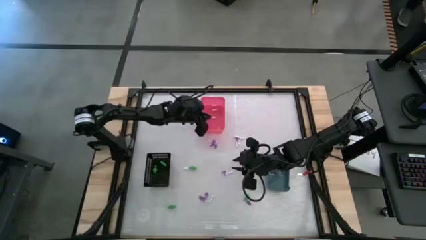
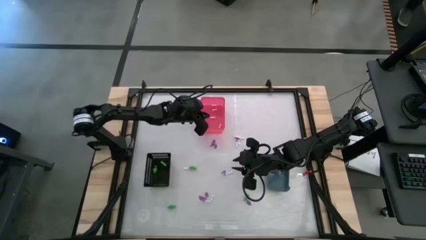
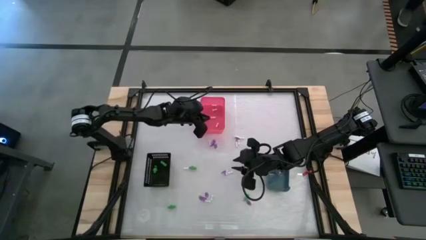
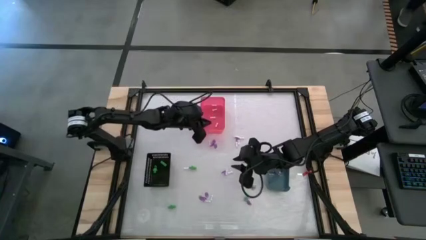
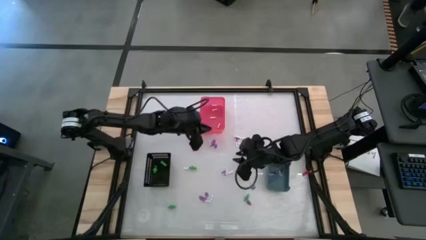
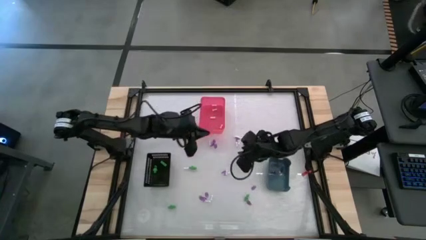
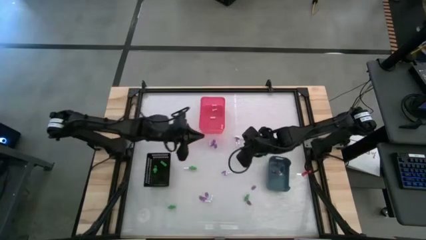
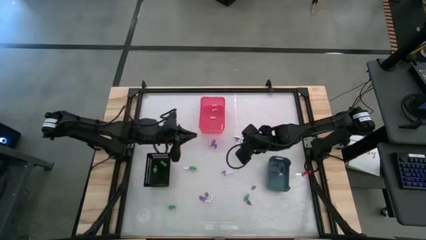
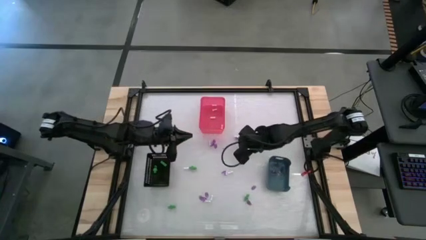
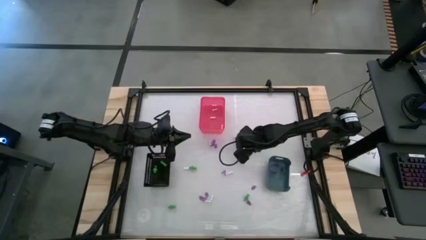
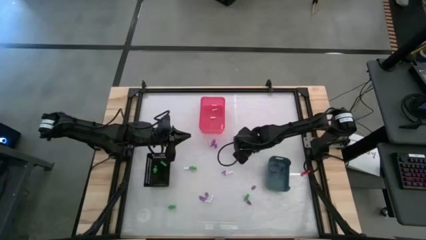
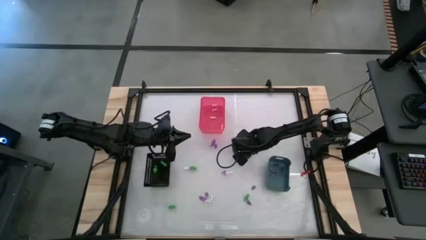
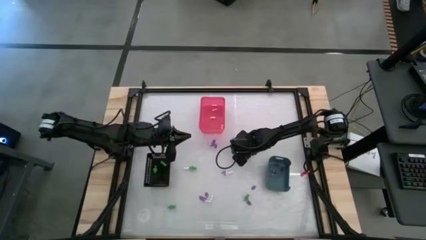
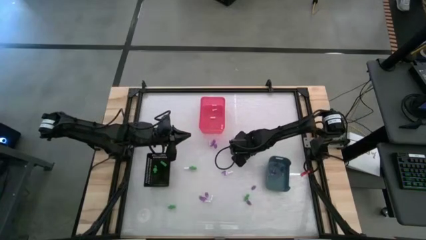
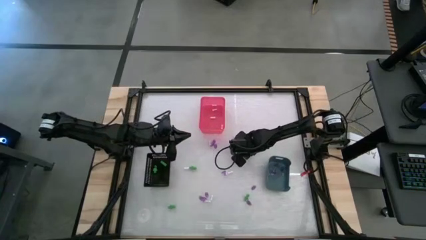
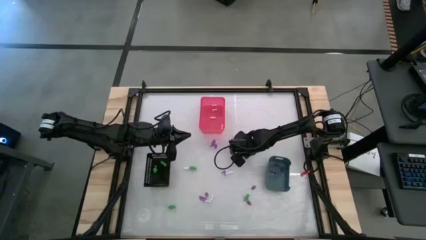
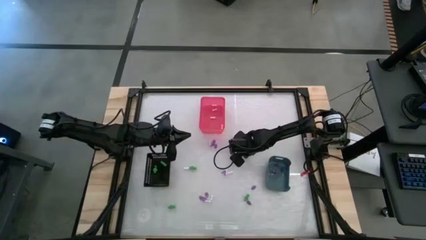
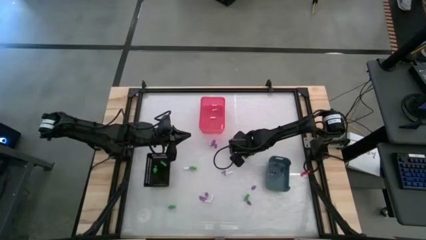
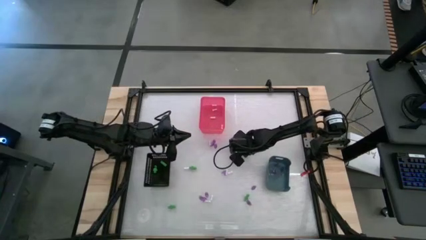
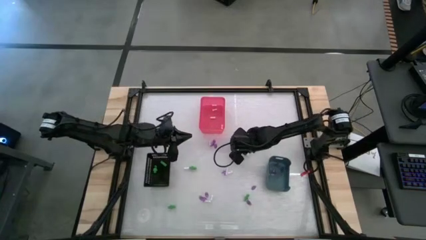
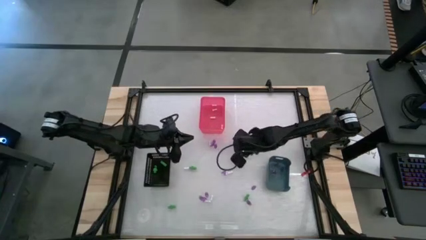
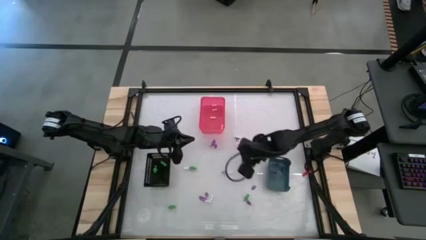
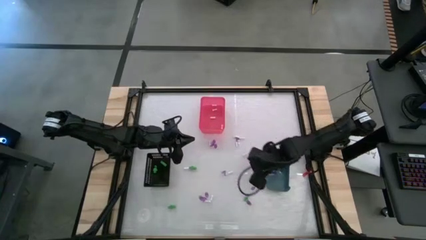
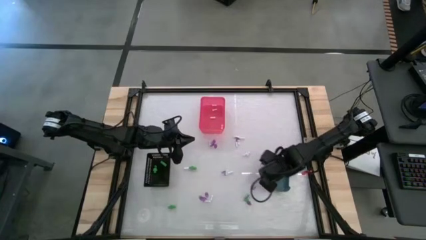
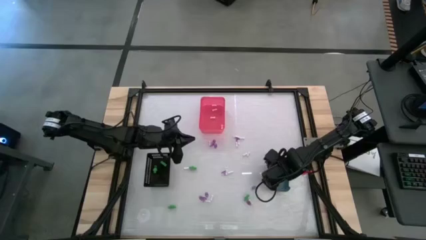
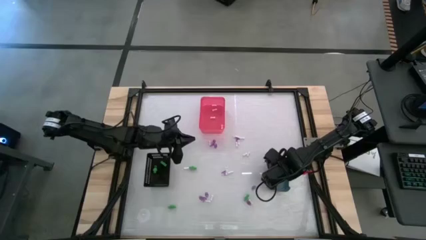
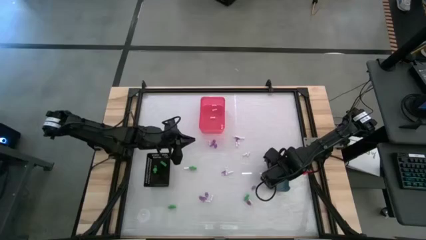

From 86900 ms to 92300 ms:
Task: Sort Halloween decoration
Put the witch hat toy into the blue bin

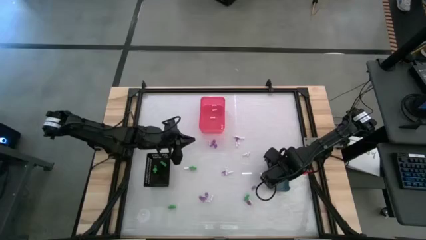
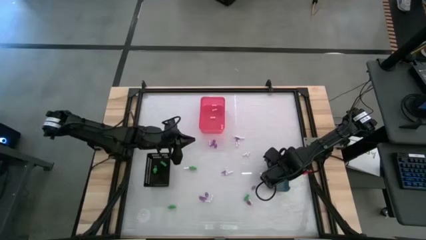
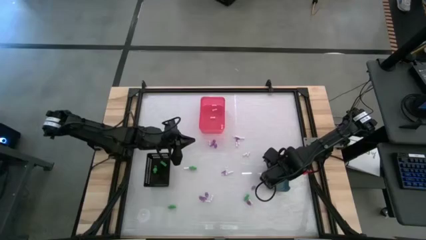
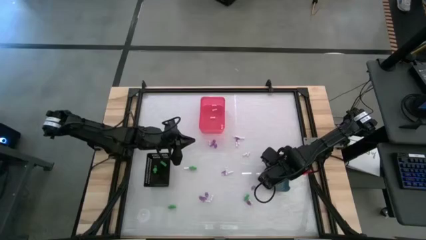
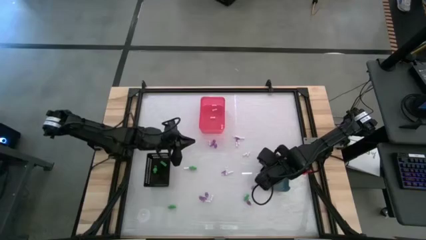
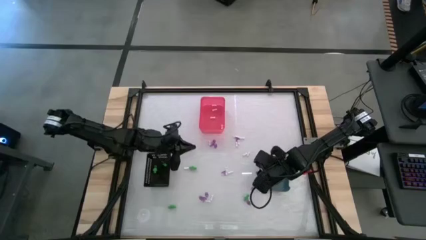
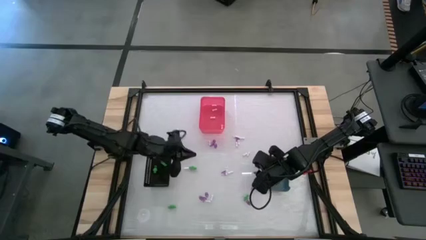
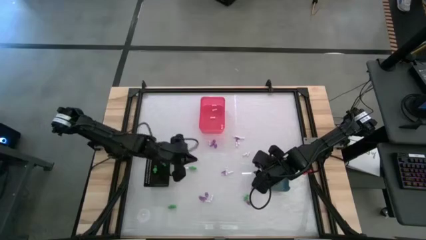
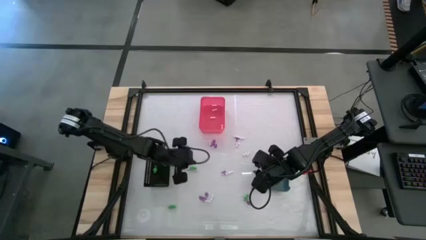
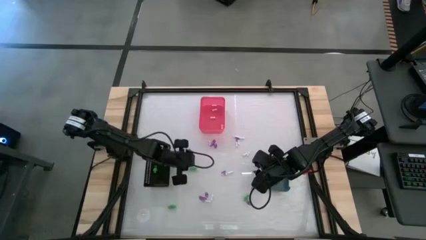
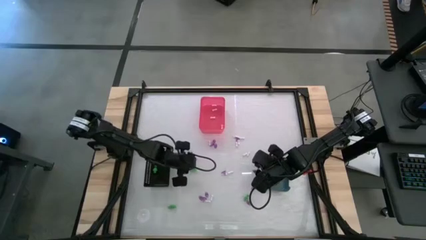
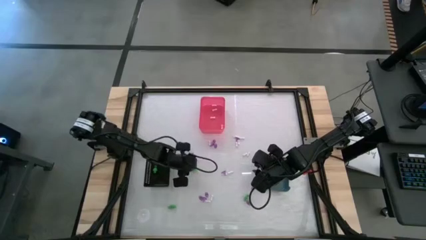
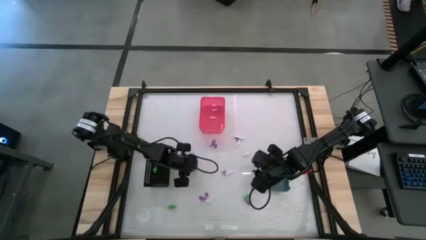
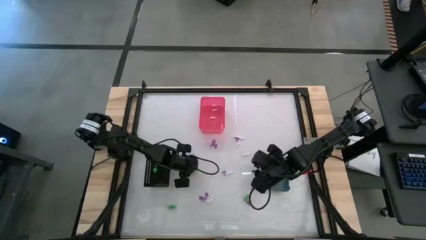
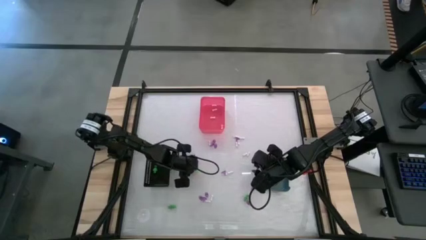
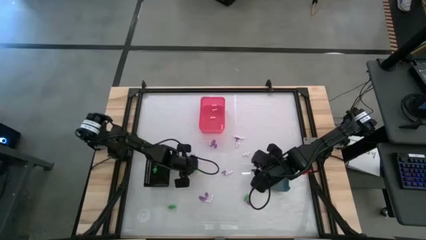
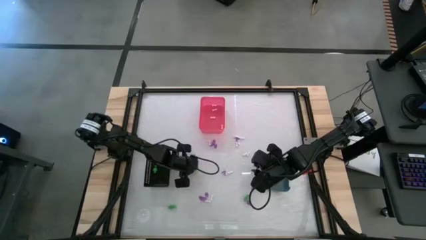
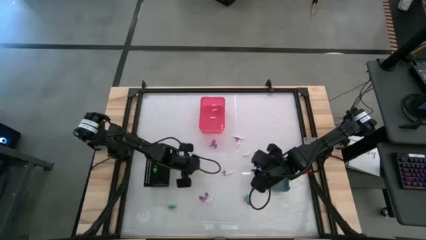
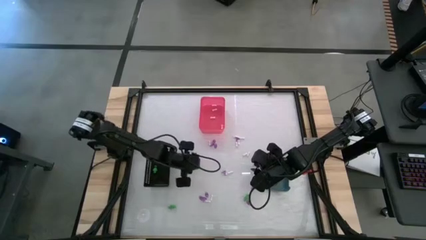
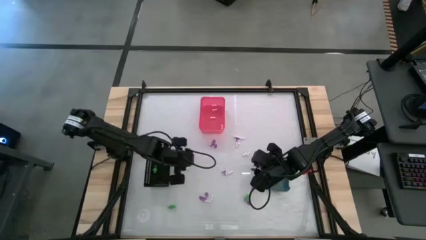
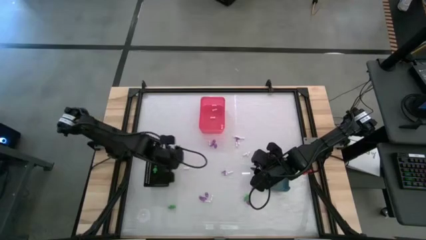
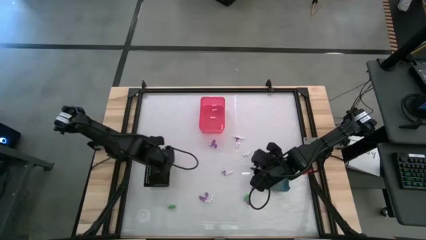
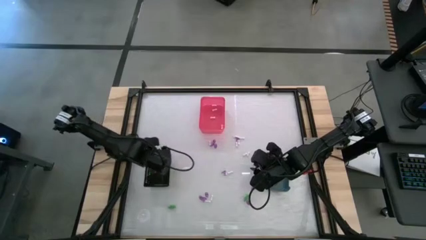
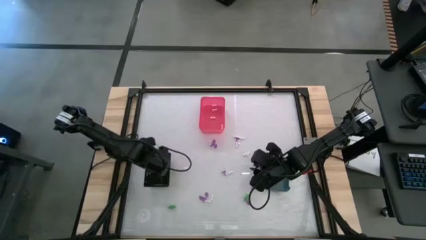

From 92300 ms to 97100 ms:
Put the skeleton toy into the black basket

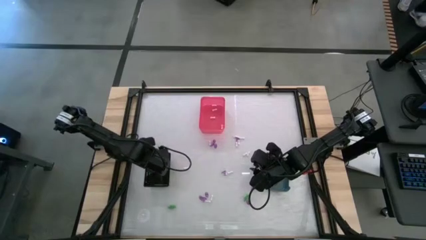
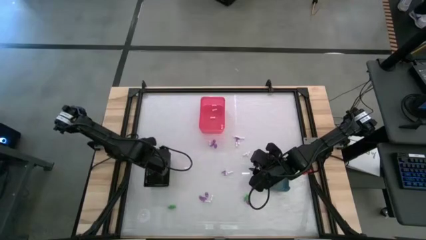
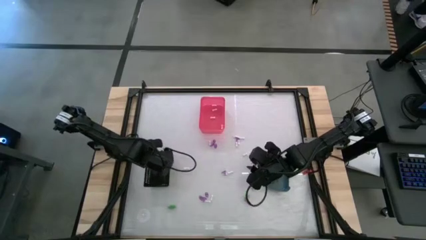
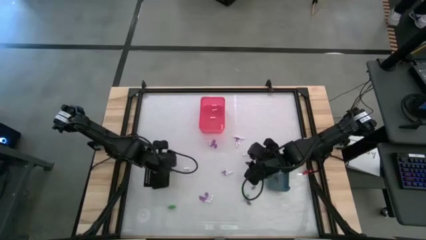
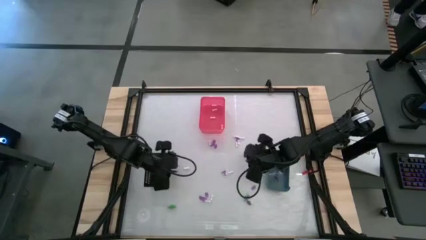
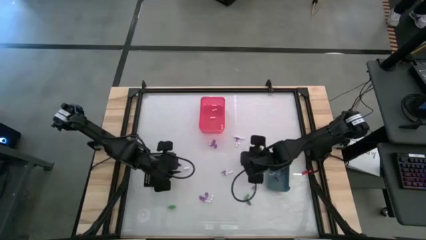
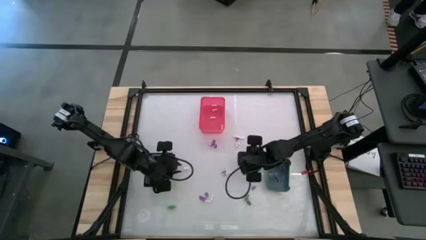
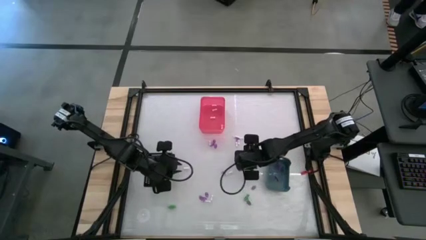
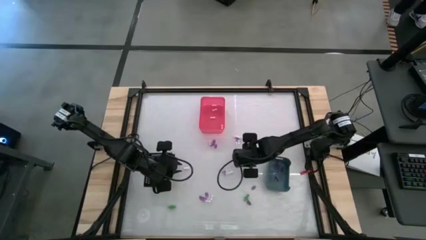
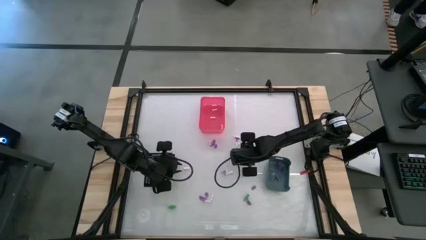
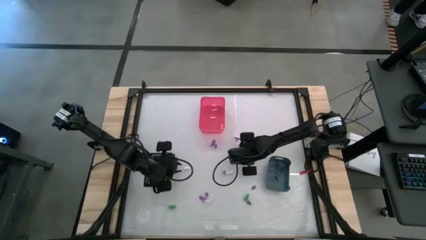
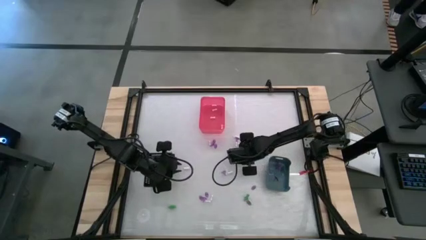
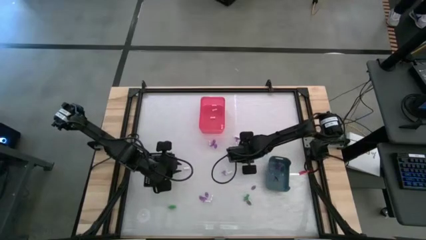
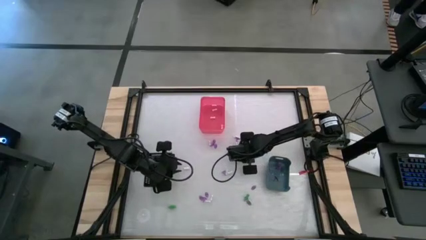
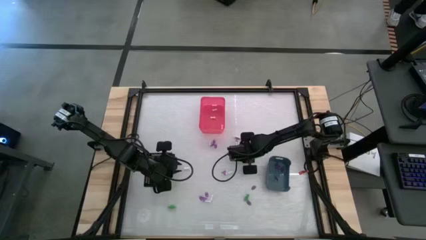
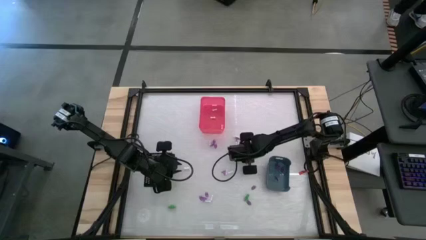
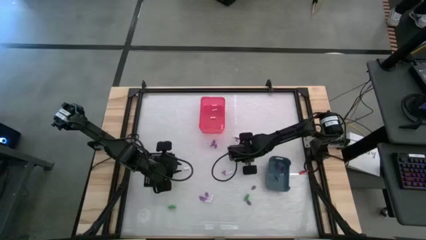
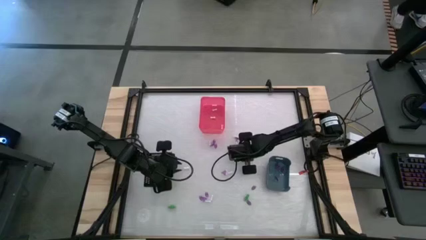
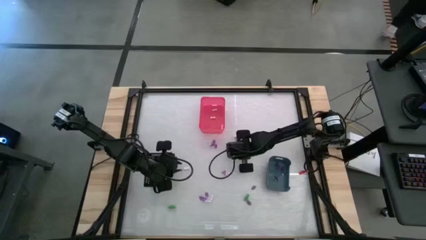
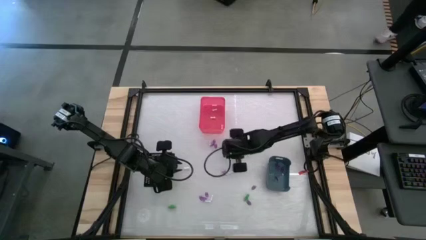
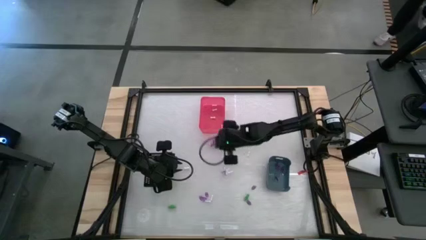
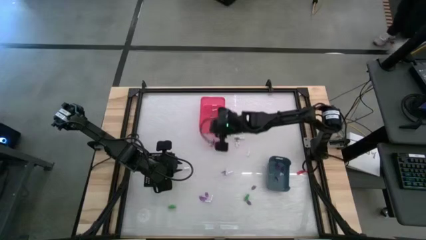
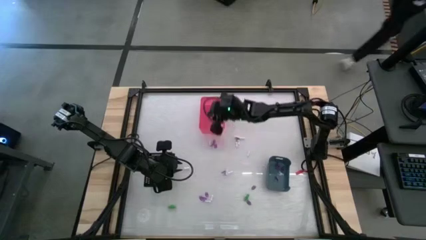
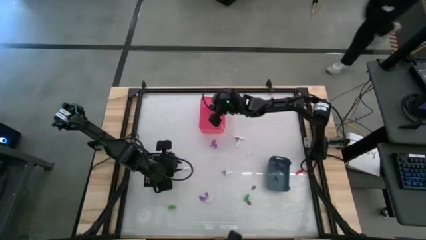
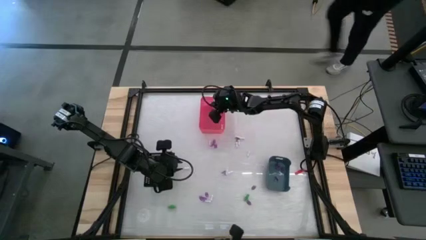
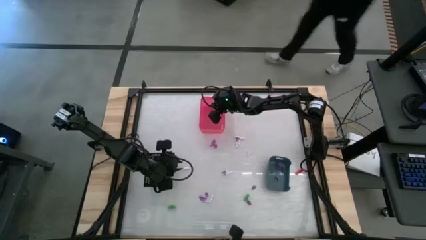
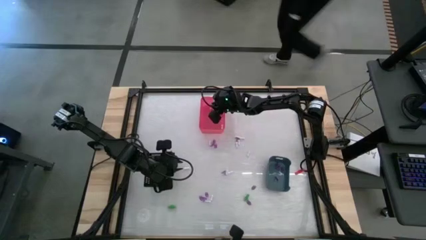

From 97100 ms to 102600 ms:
Put the bone toy into the red bin

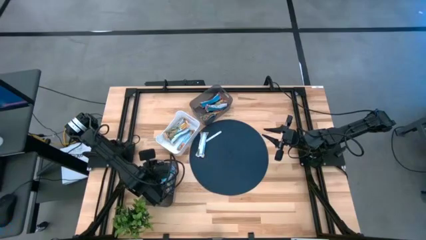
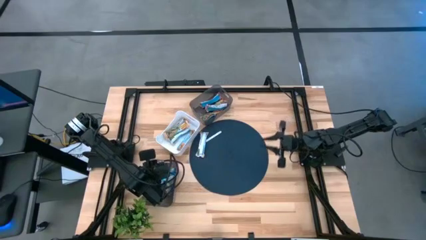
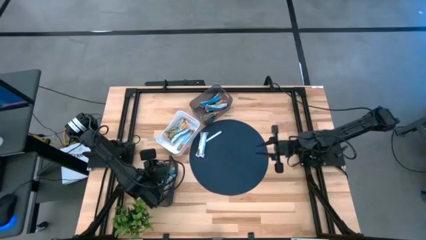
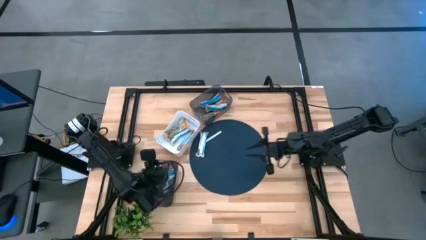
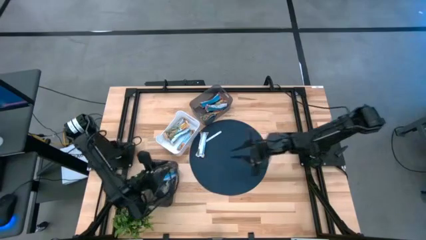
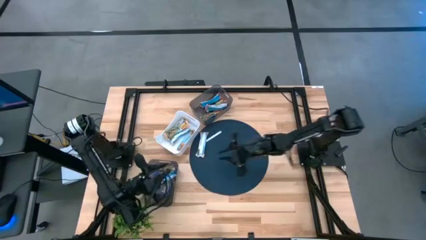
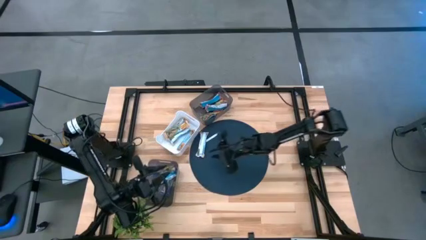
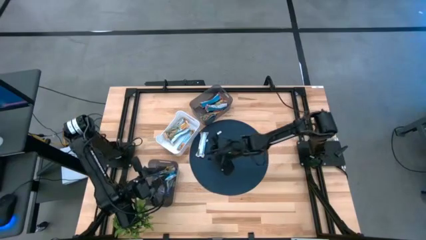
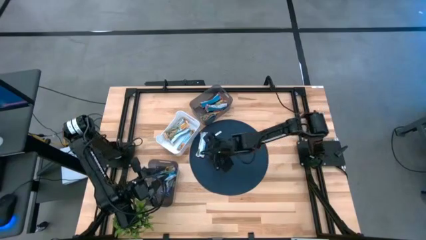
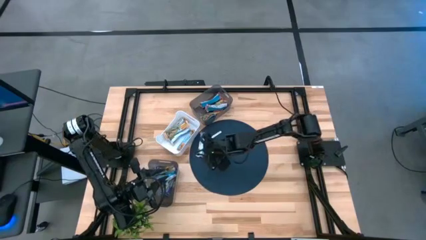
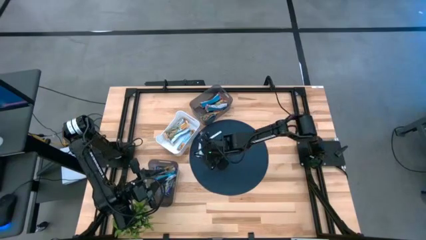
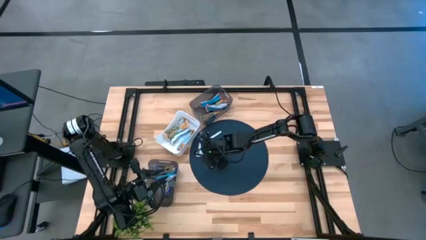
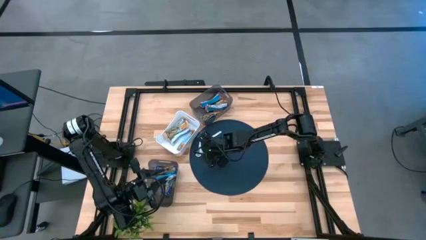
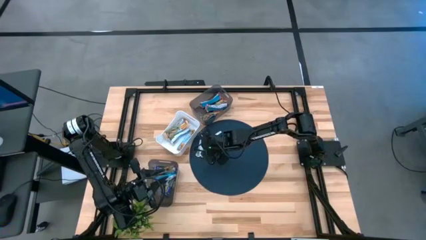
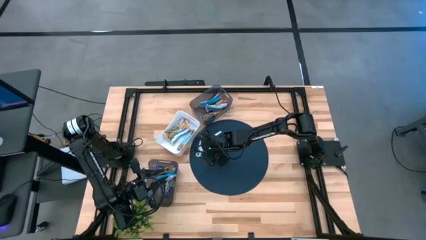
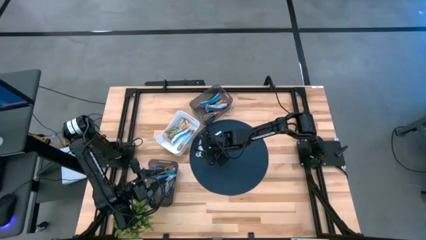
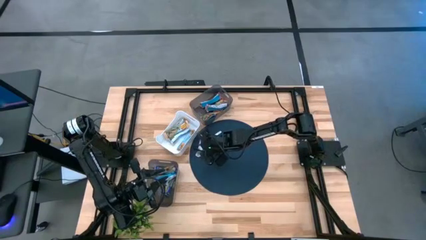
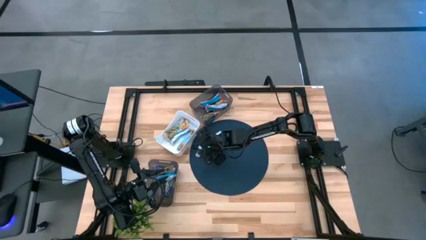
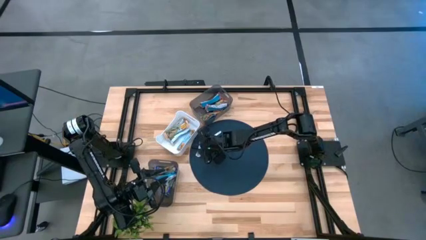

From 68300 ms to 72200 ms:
Task: Pick and place Granola Bars by type
Put the yellow granola bar into the white bin
